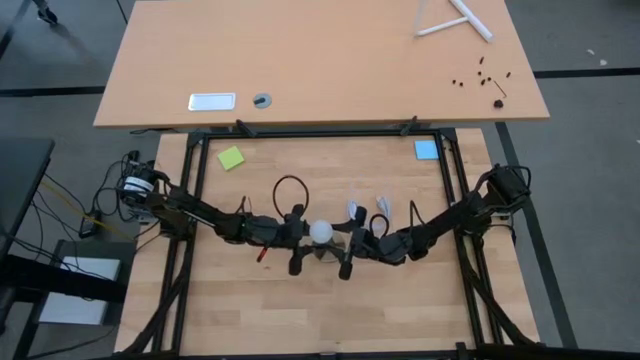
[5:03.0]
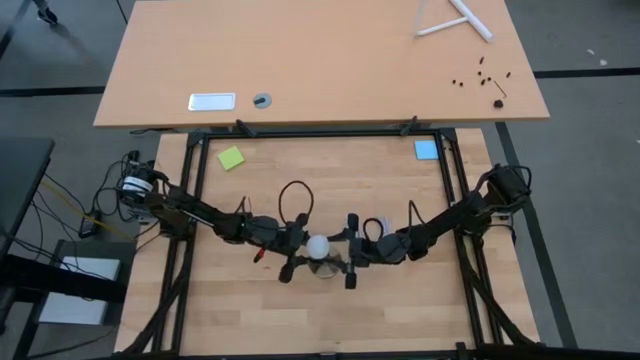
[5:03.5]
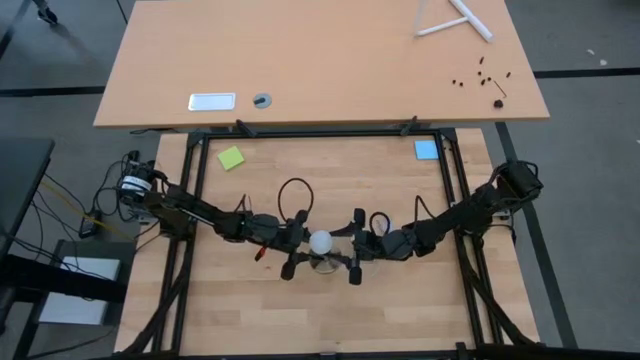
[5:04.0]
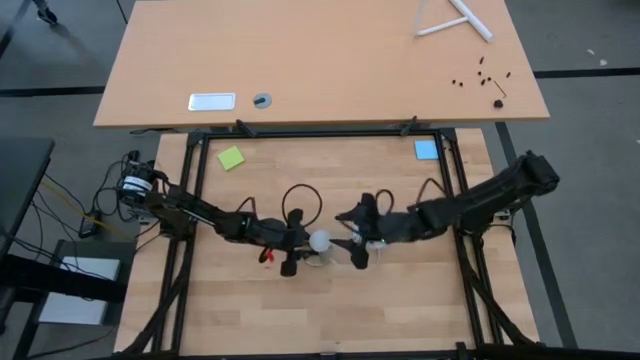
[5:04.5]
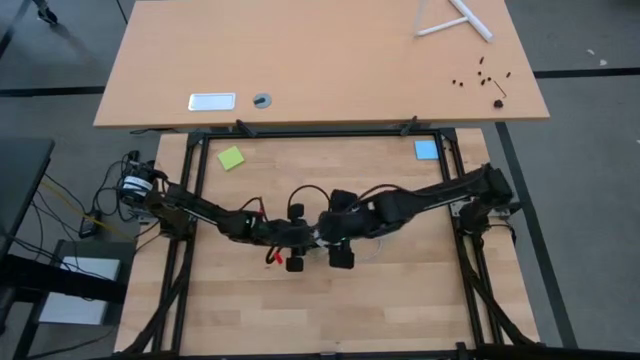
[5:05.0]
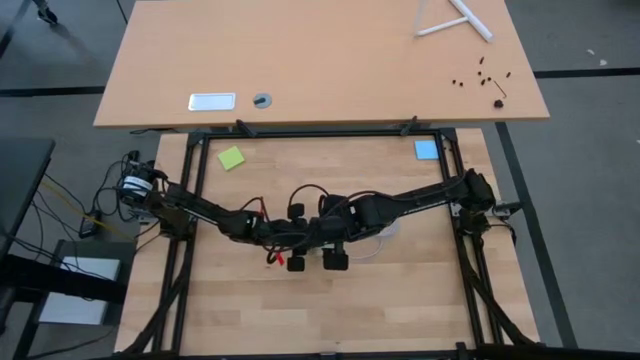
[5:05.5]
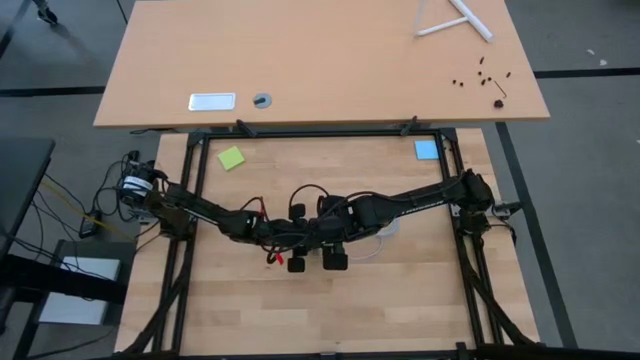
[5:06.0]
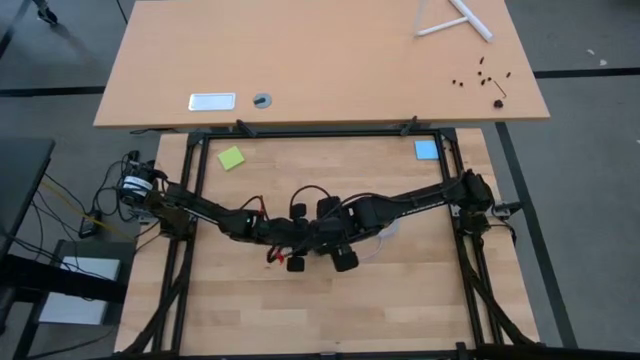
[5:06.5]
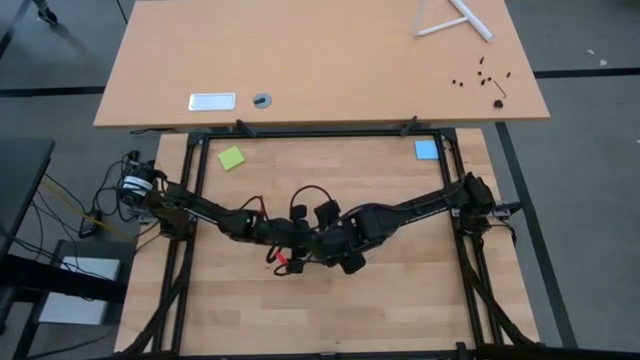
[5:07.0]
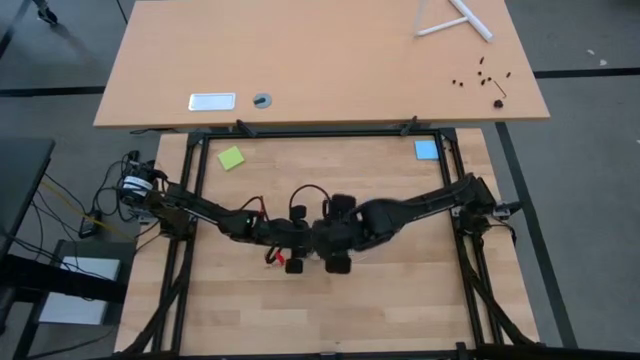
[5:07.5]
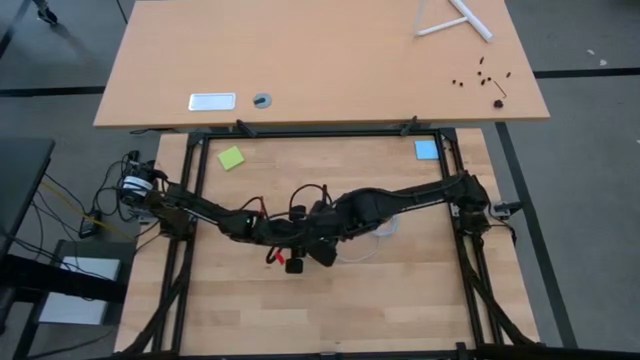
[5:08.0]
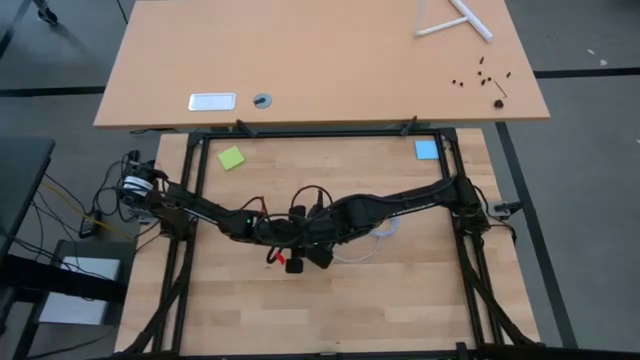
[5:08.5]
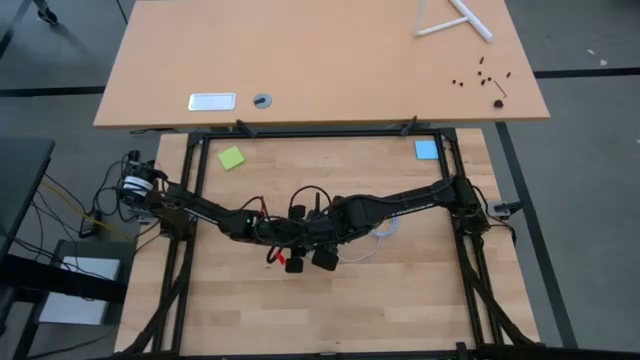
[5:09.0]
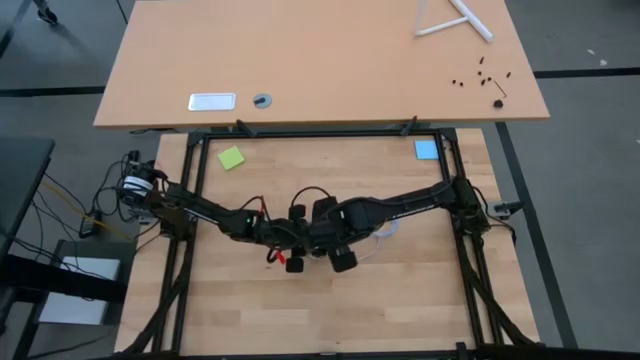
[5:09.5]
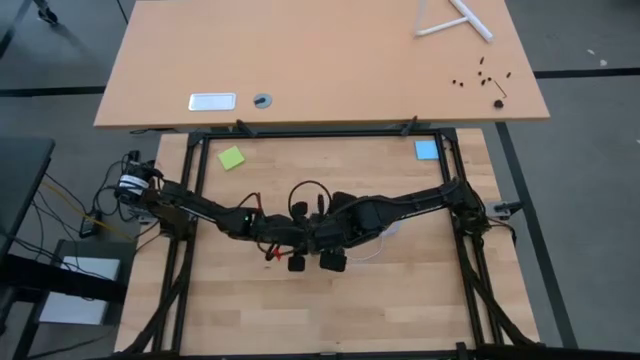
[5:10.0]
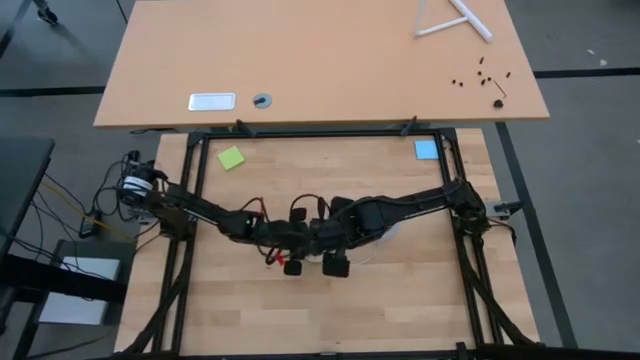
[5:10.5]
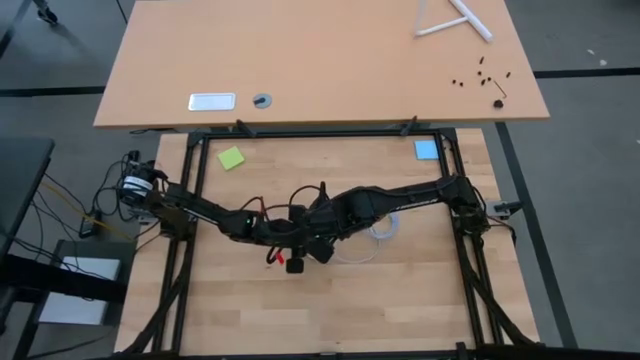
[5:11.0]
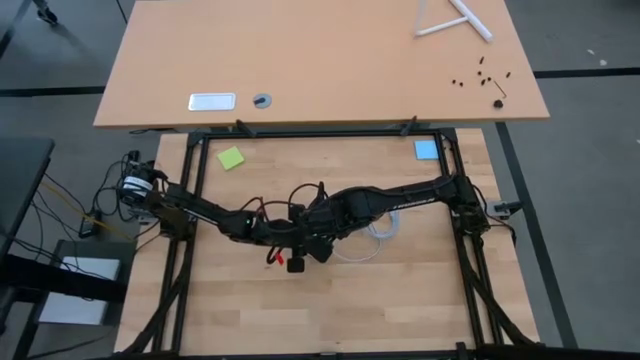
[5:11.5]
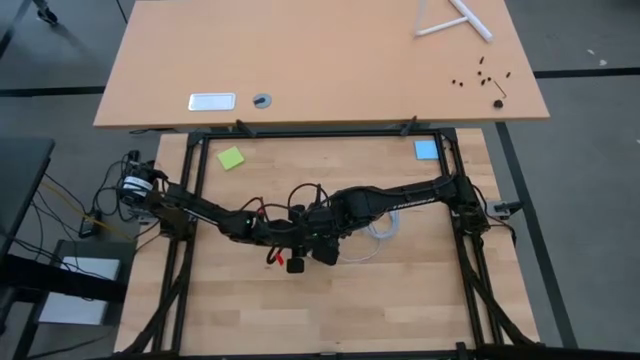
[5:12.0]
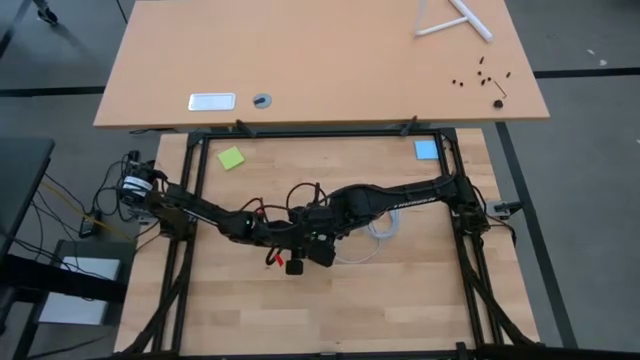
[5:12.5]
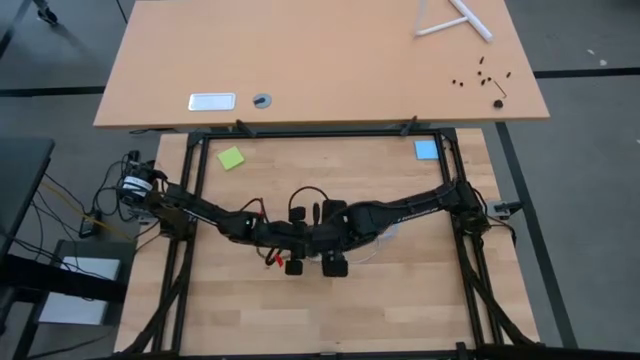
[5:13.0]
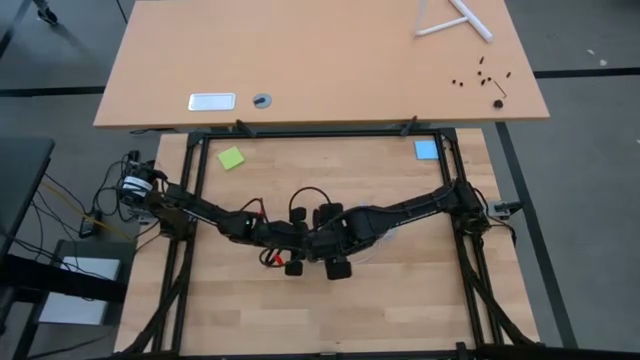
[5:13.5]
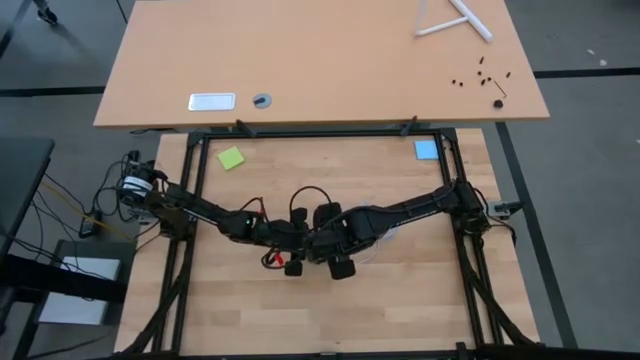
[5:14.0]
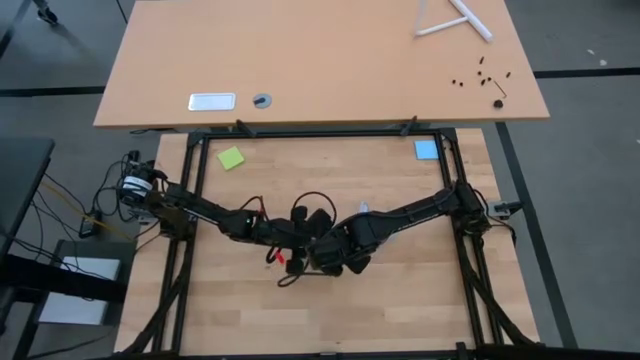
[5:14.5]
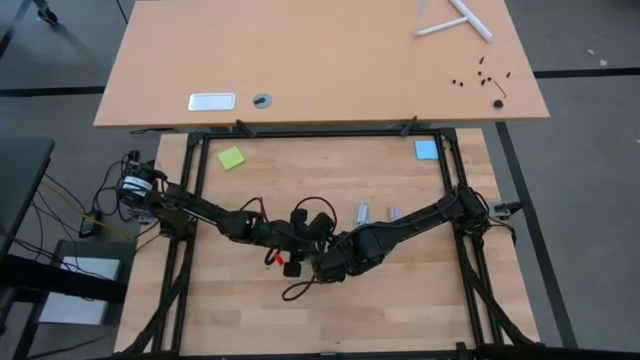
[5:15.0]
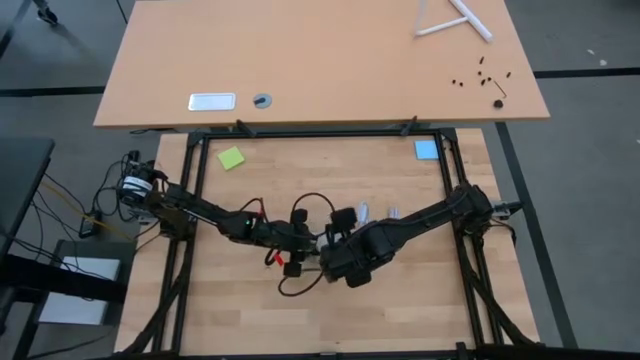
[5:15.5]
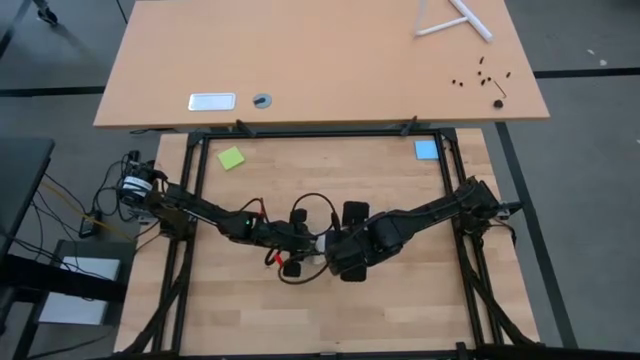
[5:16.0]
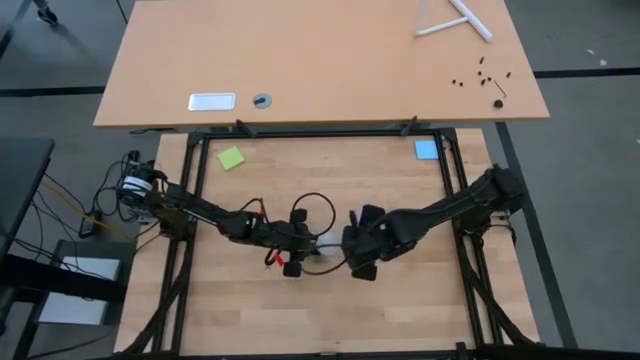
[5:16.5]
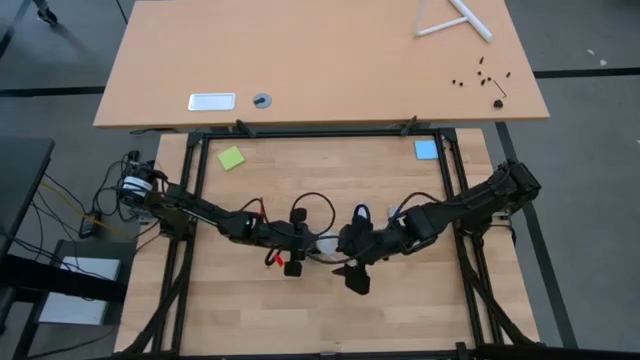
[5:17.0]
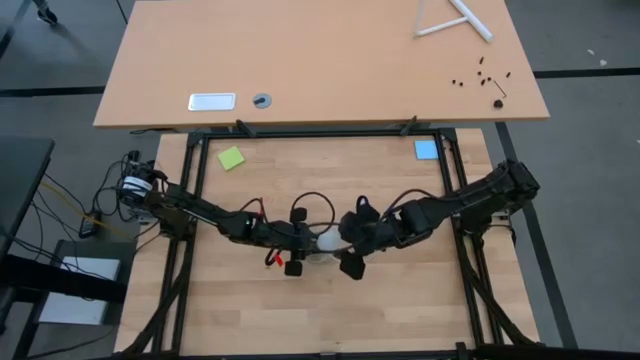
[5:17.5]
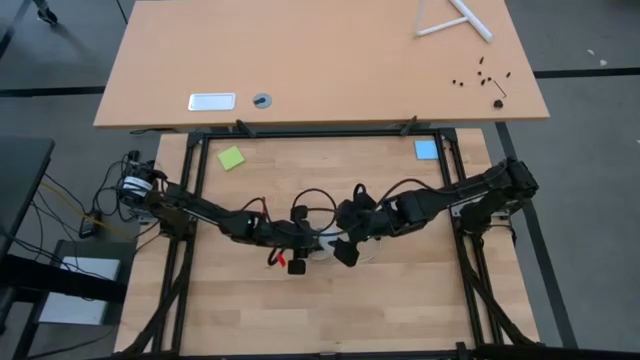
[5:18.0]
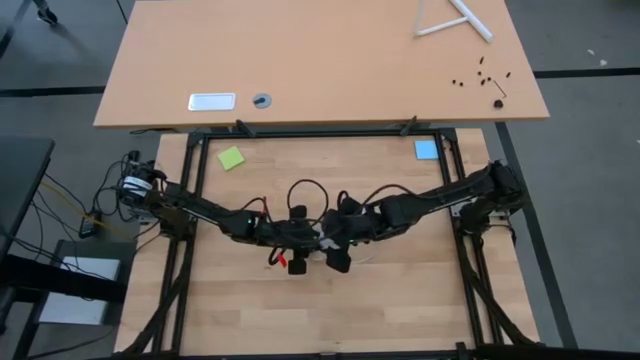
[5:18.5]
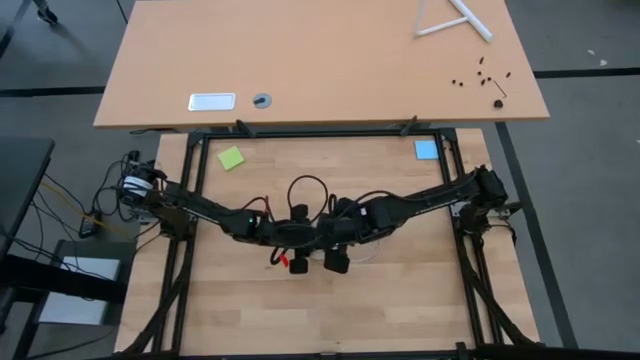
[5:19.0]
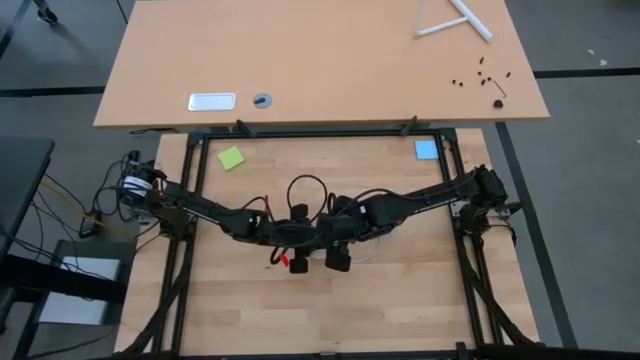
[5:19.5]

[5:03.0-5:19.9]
Task: Screw lightbulb
Remove the lightbulb from the lamp

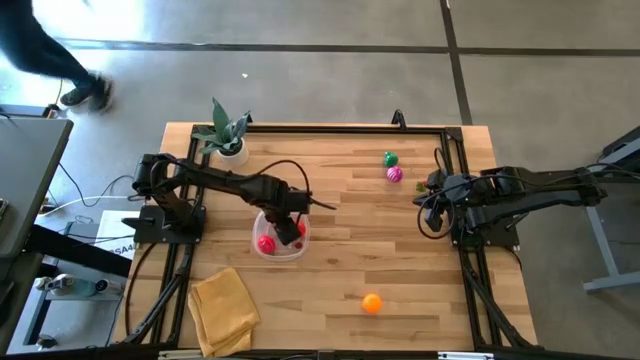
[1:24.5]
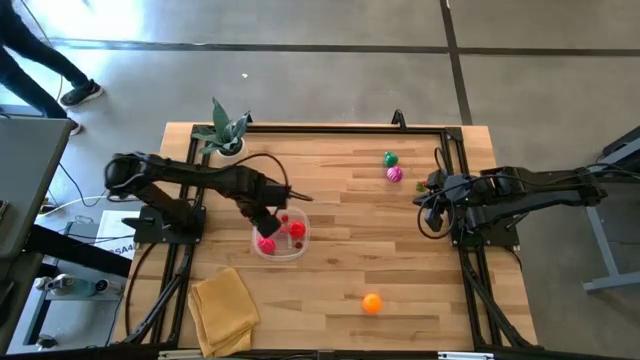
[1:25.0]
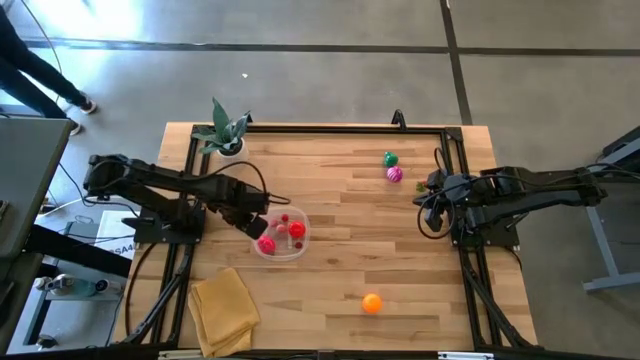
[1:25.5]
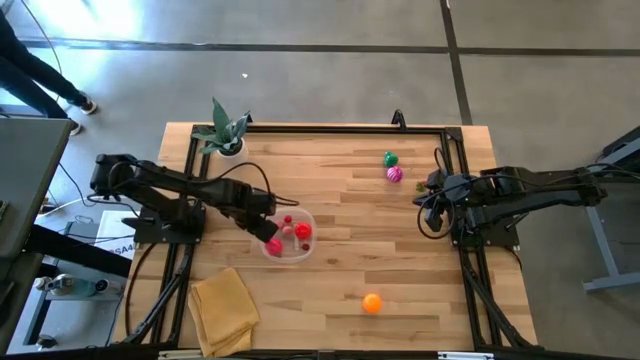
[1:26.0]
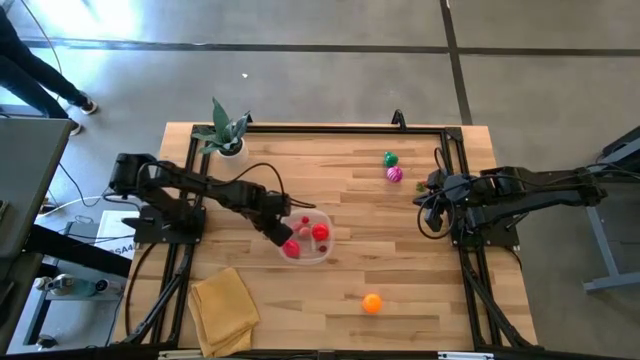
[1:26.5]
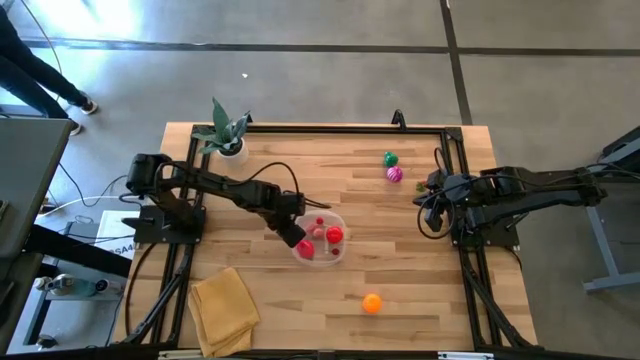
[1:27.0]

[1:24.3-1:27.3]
Task: Pick and placing Produce into tupperware
Adjust the transparent container
